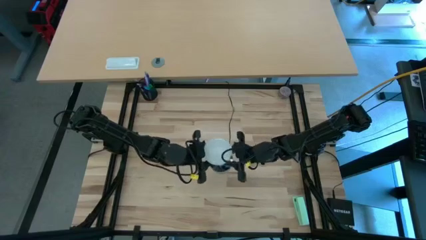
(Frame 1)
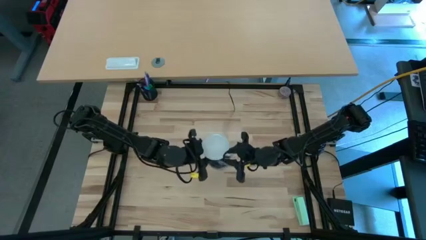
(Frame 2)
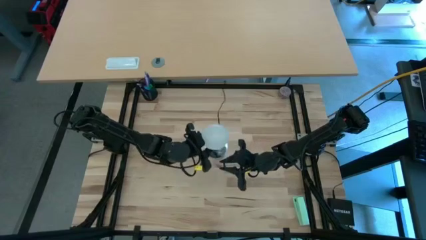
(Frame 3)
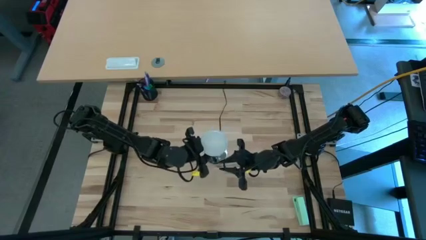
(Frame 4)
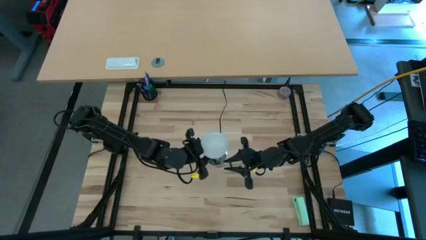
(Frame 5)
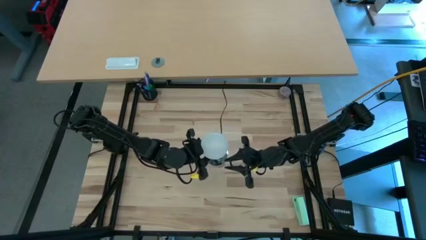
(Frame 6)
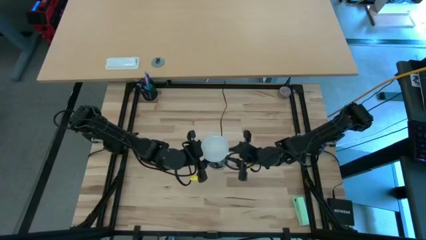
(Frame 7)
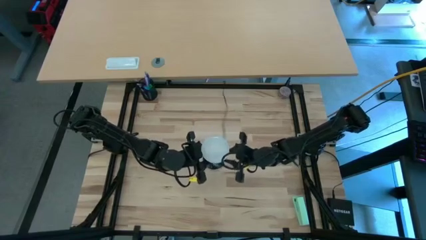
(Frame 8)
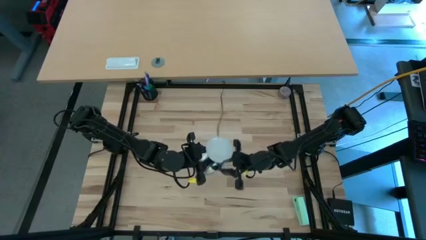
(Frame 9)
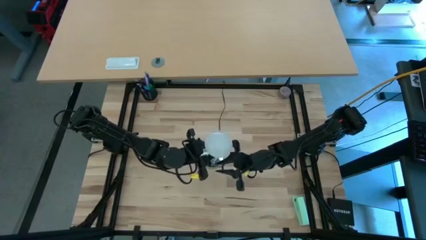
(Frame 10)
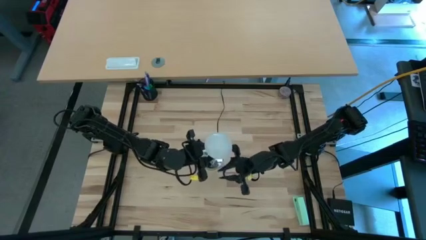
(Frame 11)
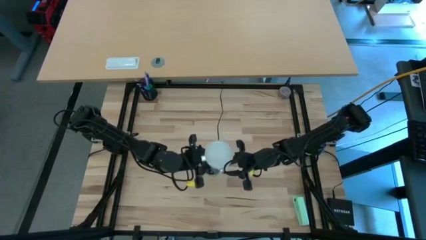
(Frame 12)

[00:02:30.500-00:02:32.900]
Task: Screw lightbulb
Remove the lightbulb from the lamp

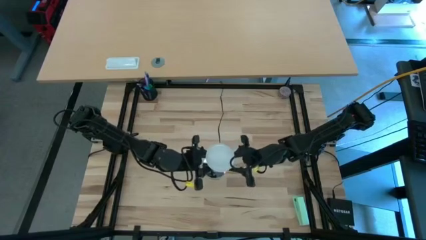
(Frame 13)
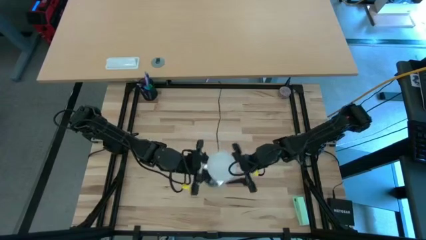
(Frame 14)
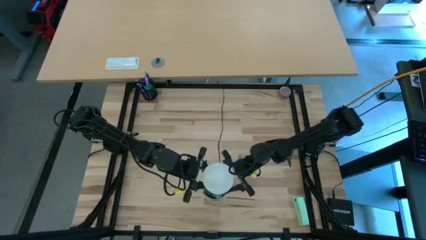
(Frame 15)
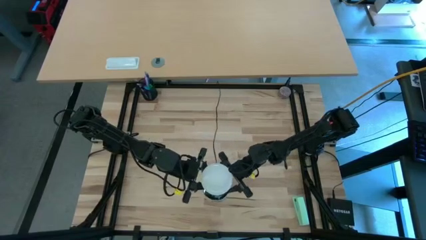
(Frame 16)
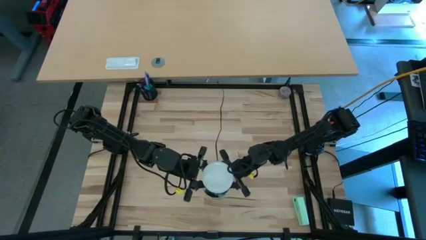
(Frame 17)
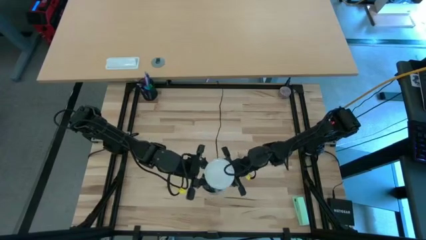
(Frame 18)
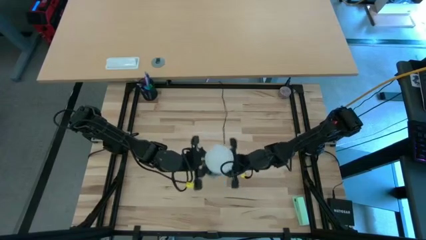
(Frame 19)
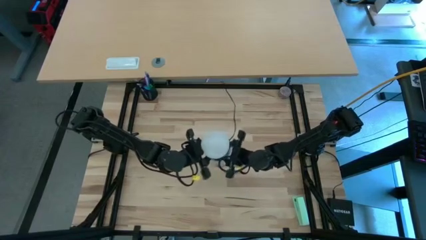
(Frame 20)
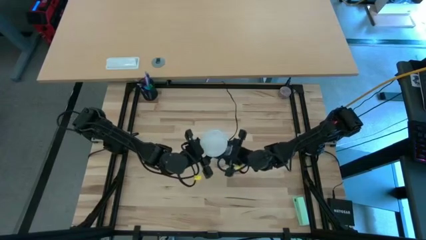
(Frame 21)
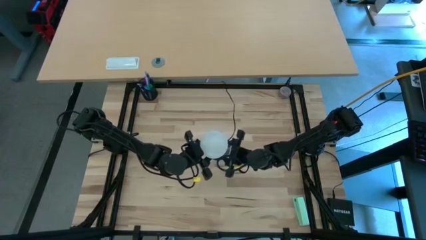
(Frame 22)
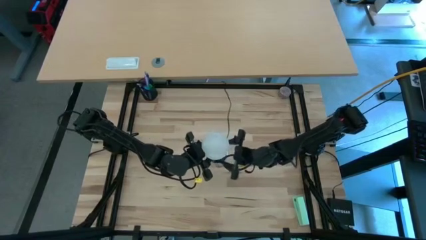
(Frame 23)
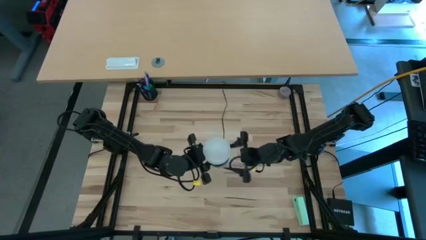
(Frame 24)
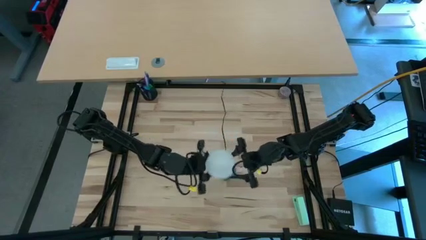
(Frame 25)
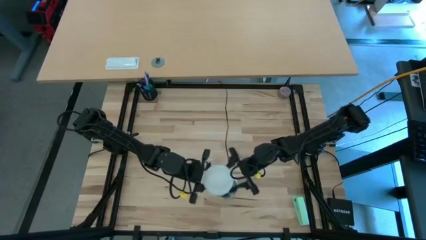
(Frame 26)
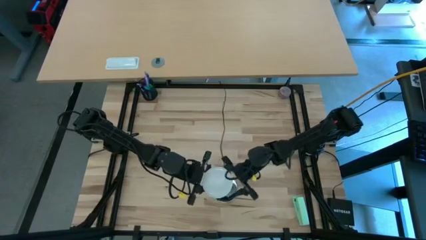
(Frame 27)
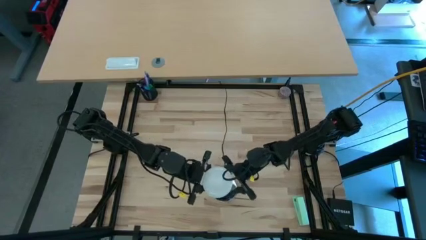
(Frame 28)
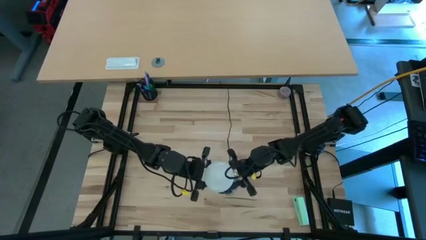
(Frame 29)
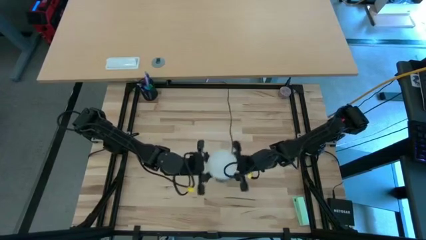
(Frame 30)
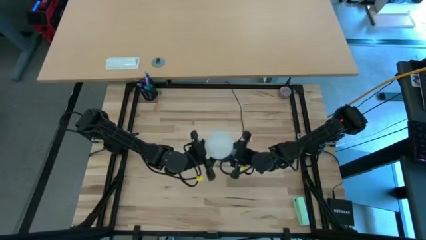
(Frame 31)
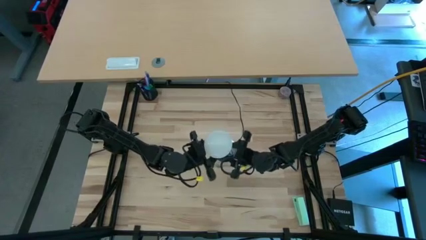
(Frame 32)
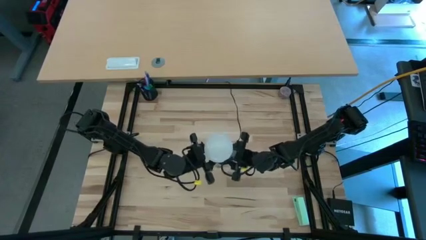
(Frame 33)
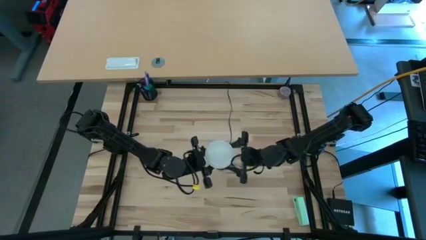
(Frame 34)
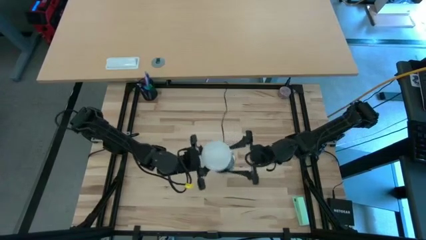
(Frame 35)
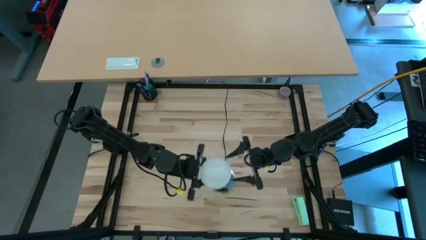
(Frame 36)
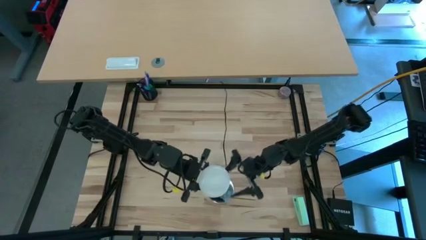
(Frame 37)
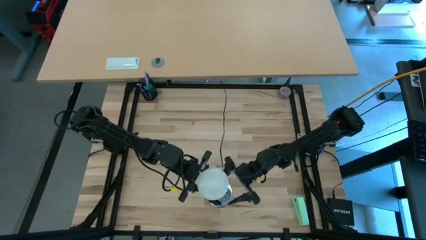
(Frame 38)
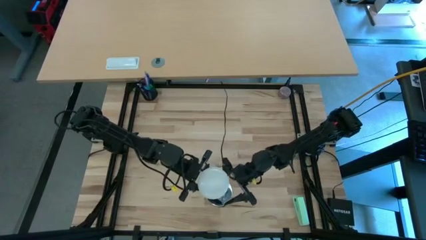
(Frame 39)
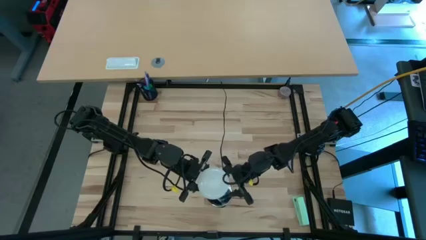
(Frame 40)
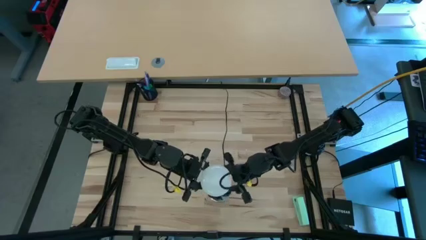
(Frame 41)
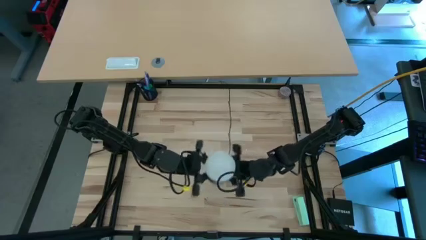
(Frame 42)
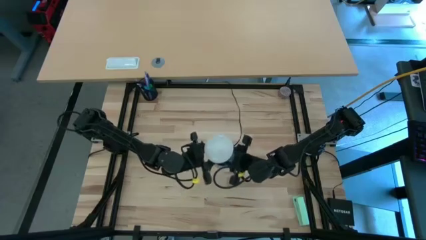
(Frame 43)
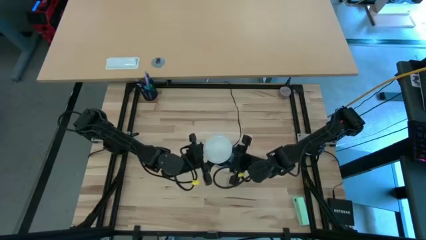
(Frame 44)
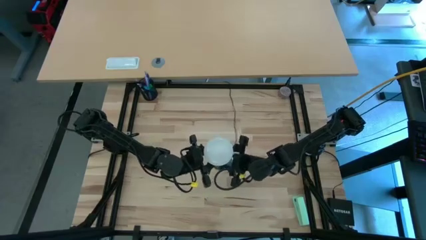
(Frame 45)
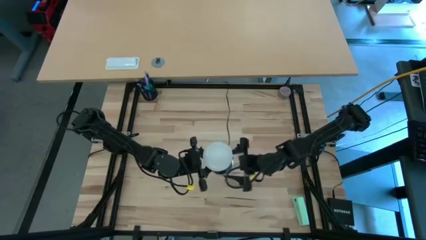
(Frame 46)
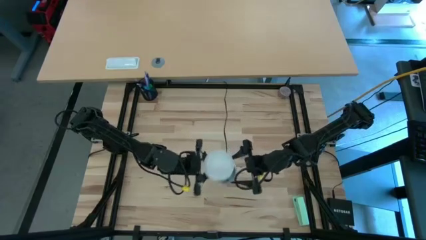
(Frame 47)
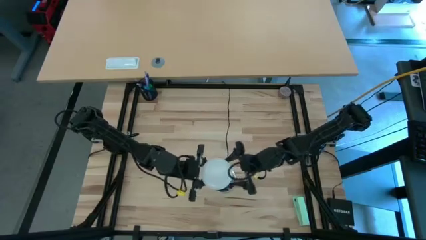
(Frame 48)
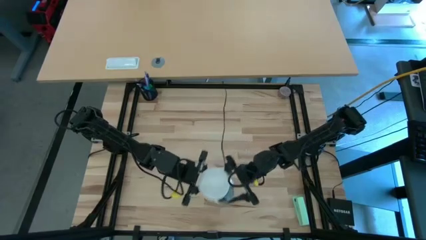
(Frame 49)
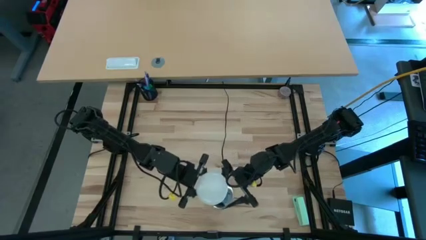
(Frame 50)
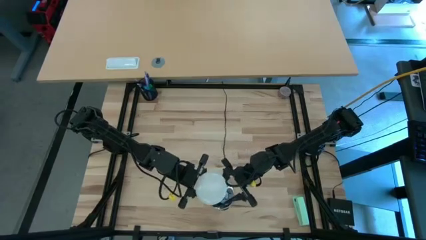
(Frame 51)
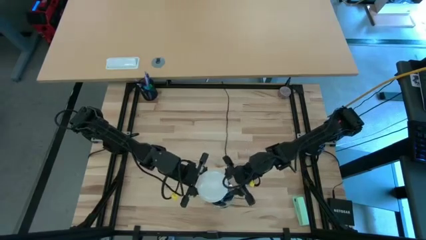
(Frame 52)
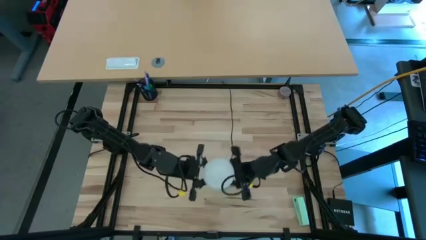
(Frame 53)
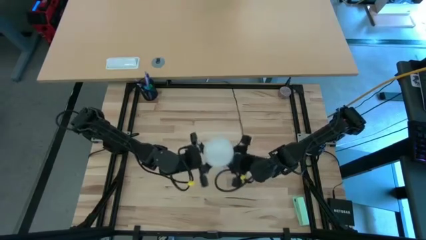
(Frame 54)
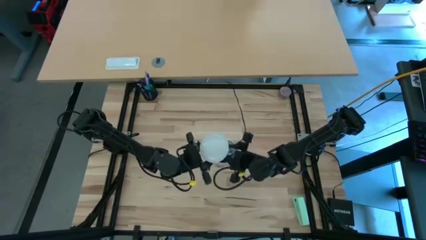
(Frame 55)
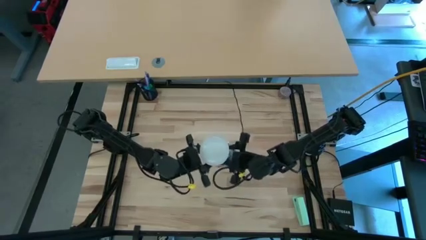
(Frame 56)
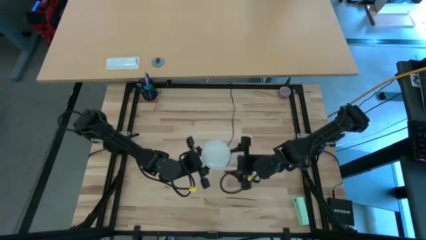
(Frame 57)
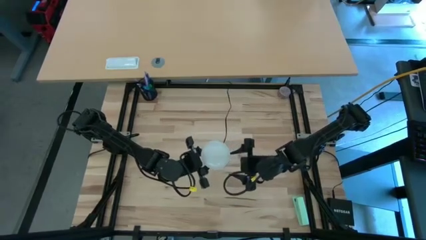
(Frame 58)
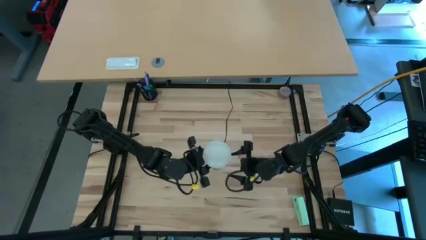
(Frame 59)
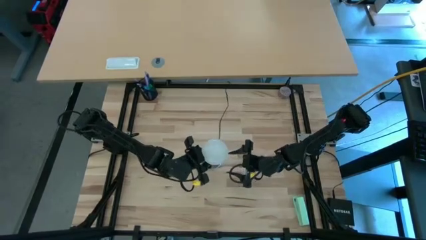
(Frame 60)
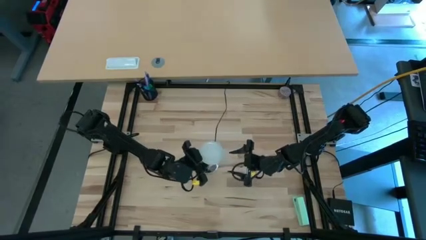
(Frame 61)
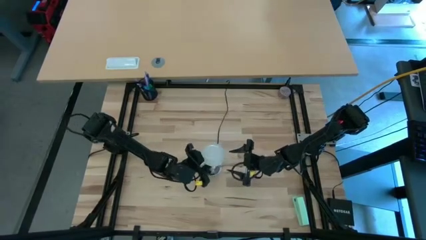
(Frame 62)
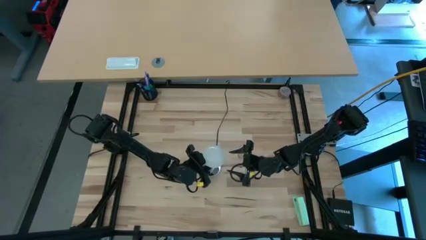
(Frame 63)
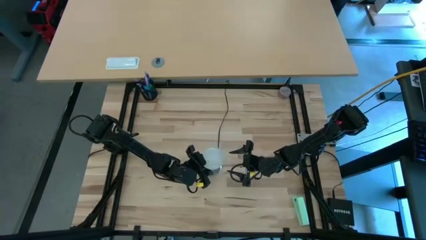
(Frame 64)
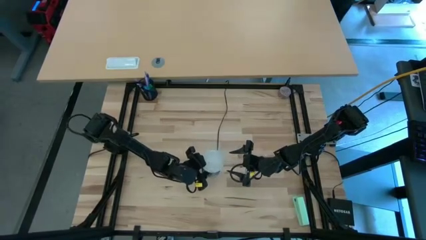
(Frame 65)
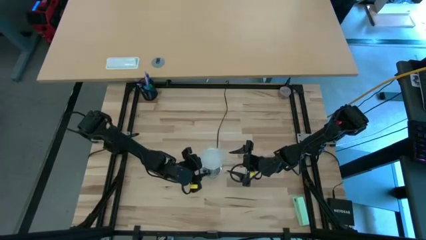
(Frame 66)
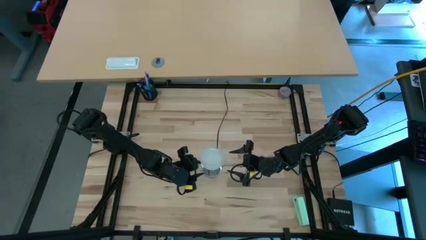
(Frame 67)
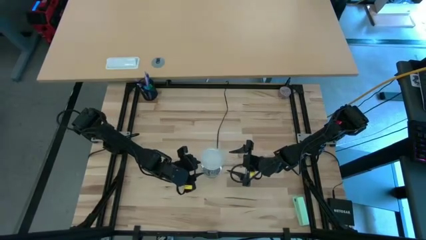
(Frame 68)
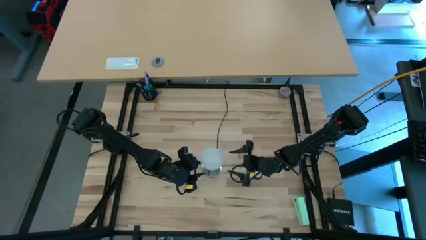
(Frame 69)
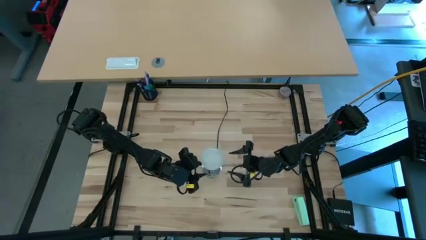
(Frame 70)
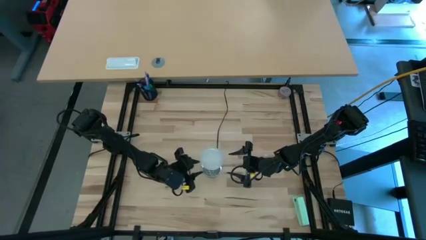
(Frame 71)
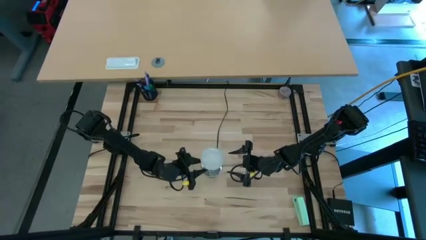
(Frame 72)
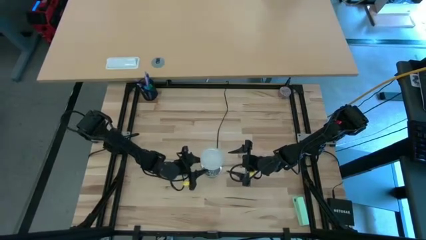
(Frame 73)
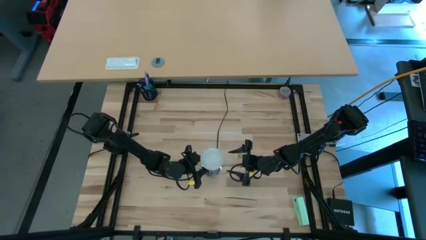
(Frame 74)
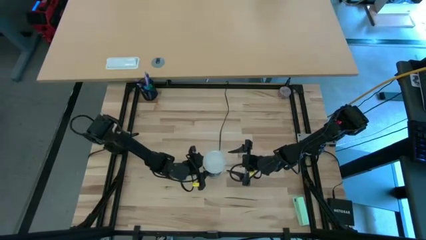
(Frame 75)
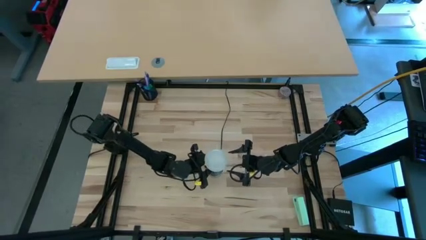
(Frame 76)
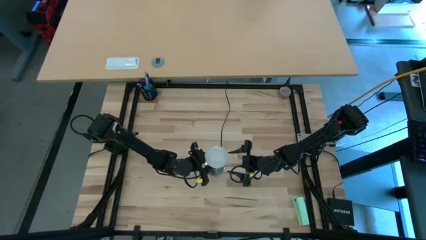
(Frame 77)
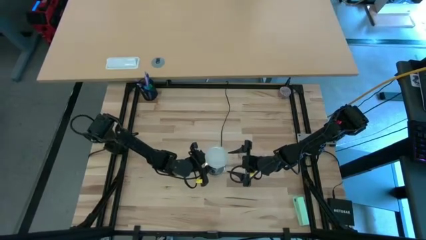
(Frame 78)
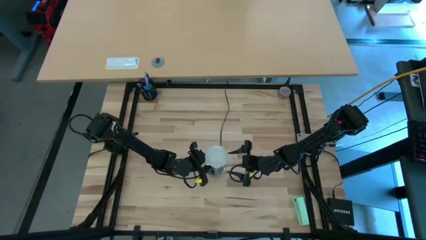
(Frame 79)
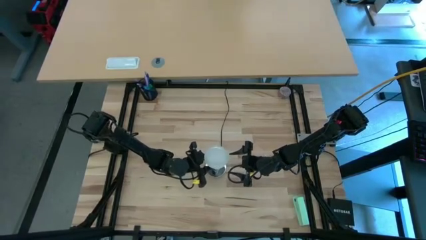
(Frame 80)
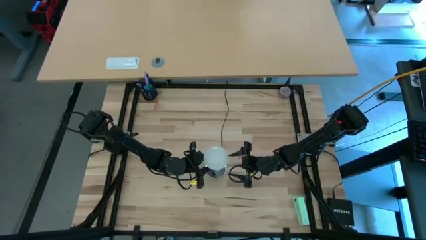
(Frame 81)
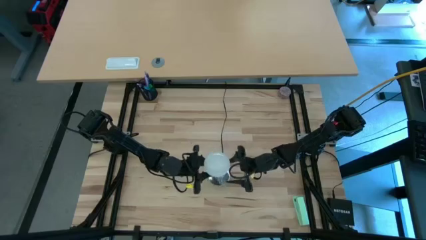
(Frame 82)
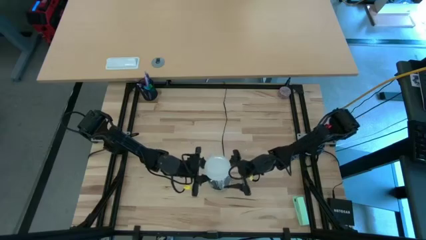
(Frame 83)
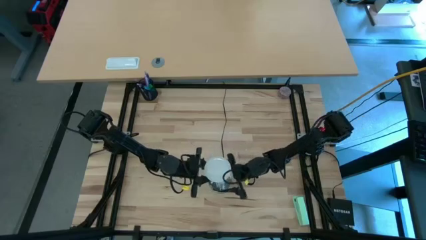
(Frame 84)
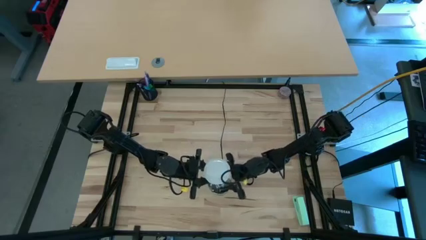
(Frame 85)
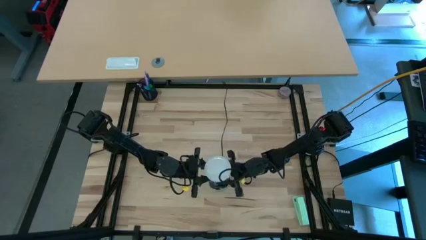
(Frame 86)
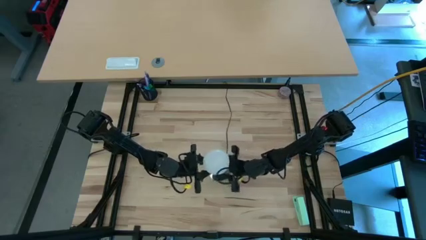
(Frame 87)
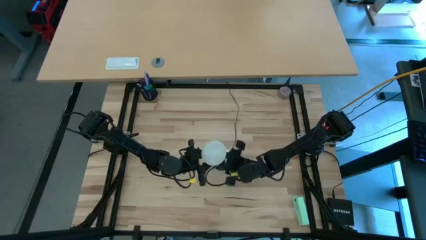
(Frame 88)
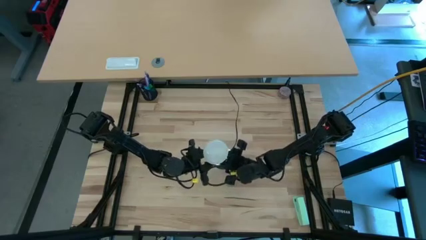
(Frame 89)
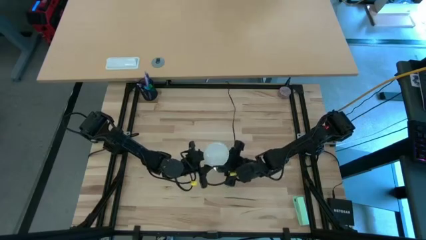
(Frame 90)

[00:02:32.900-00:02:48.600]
Remove the lightbulb from the lamp

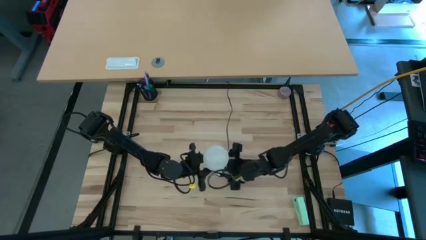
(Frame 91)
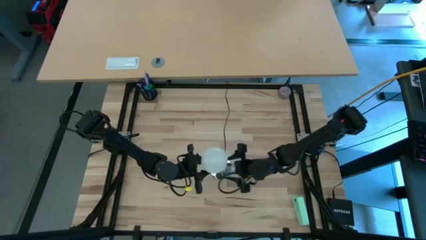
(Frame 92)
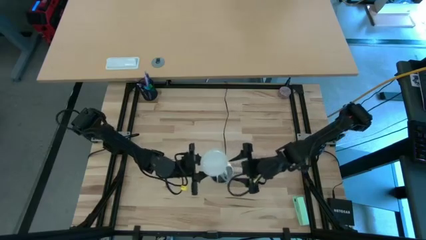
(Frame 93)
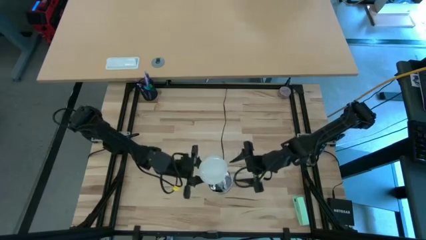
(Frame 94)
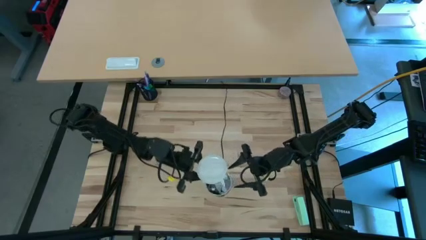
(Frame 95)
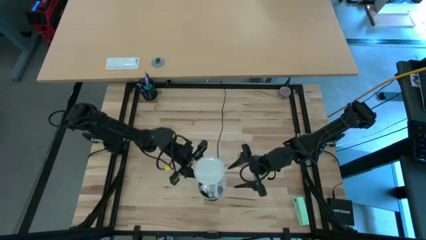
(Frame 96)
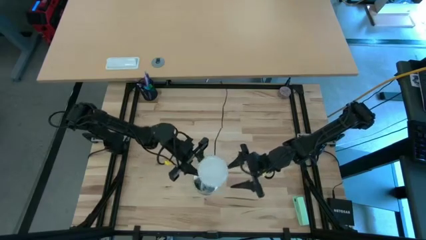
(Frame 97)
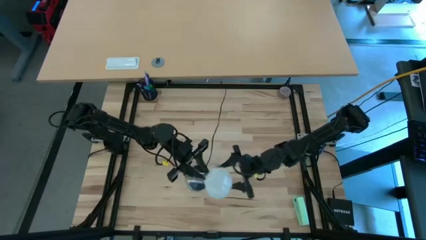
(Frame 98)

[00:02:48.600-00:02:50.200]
Remove the lightbulb from the lamp
